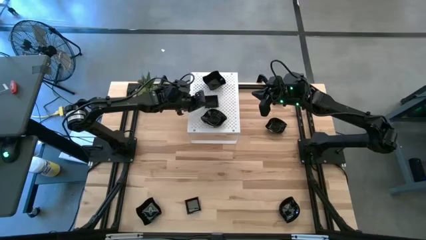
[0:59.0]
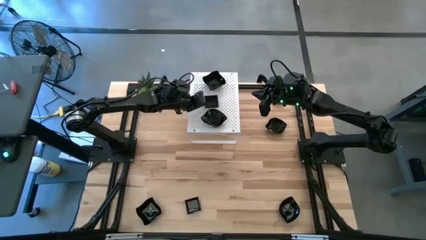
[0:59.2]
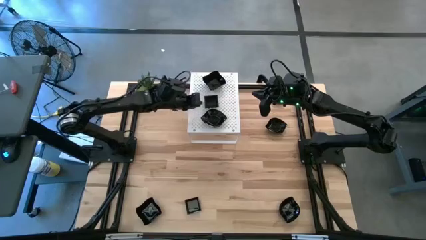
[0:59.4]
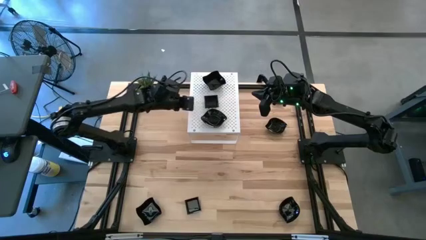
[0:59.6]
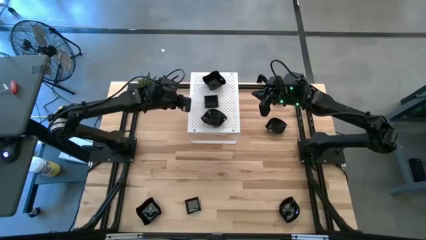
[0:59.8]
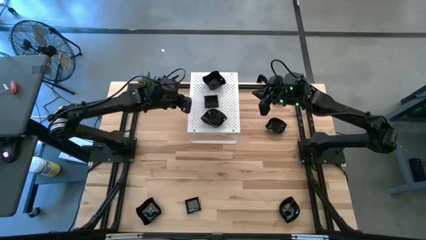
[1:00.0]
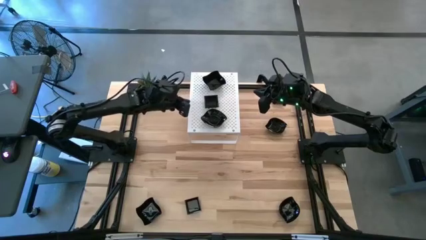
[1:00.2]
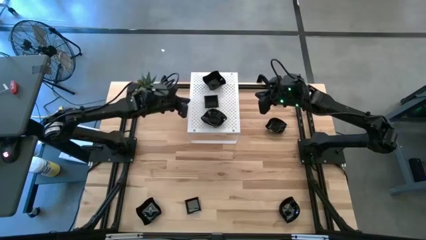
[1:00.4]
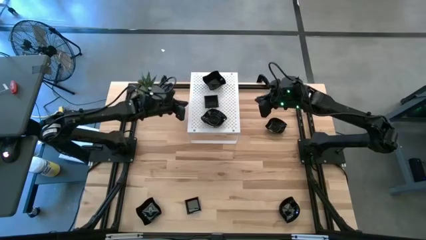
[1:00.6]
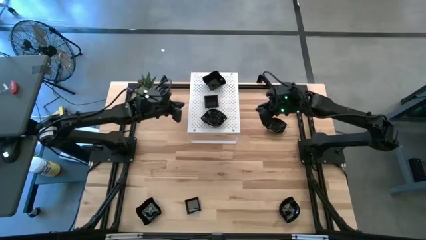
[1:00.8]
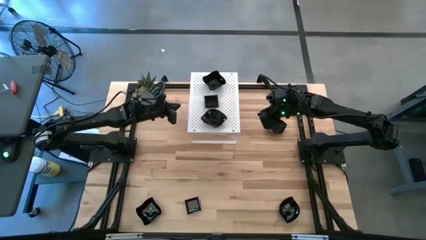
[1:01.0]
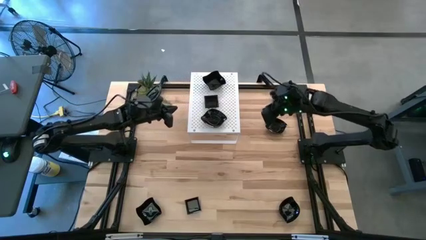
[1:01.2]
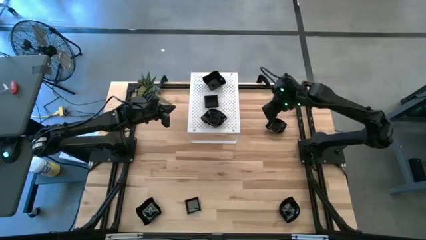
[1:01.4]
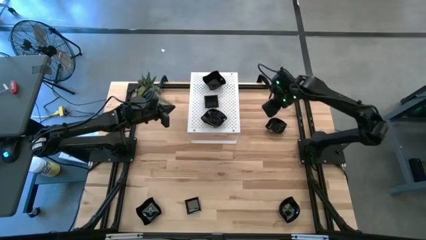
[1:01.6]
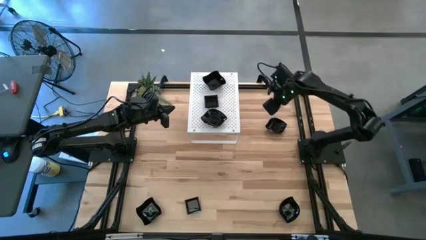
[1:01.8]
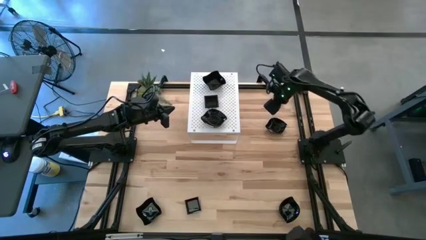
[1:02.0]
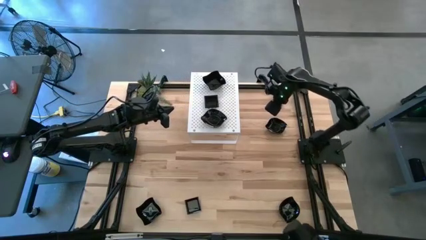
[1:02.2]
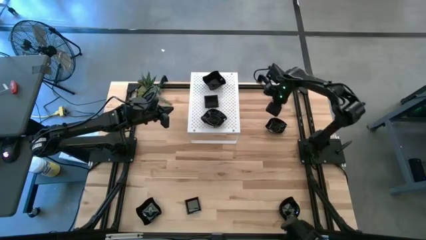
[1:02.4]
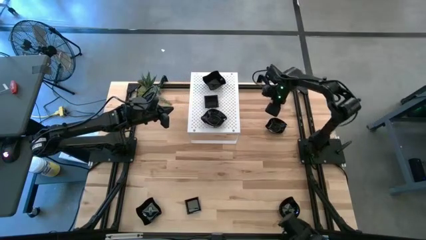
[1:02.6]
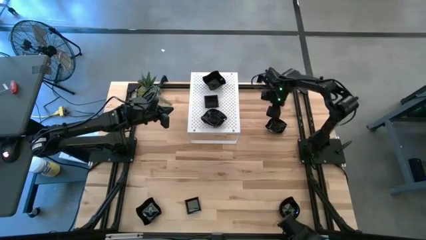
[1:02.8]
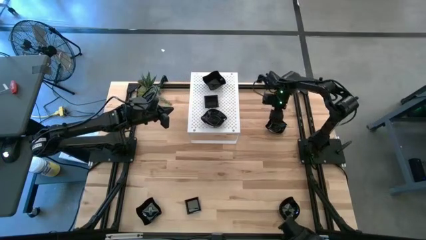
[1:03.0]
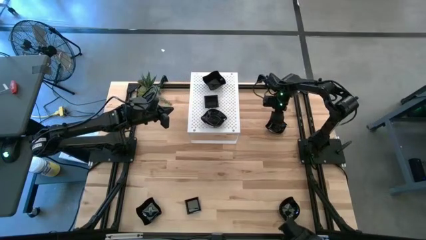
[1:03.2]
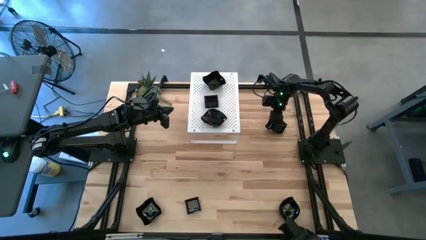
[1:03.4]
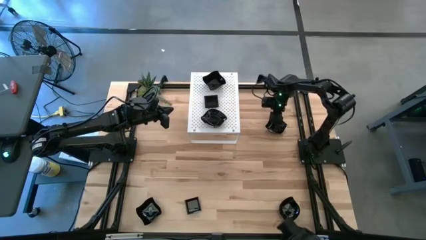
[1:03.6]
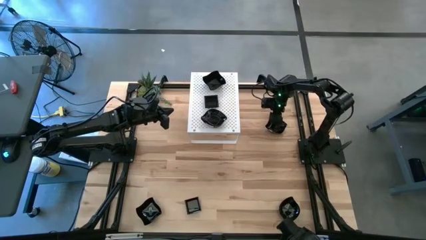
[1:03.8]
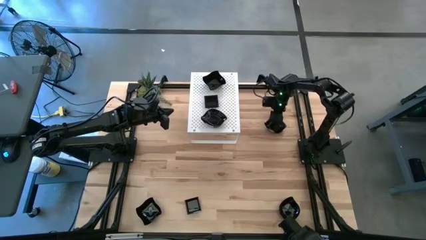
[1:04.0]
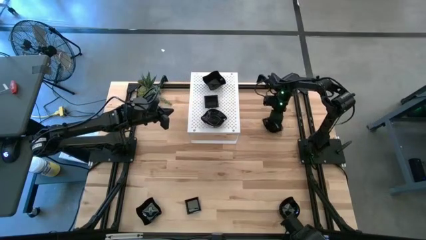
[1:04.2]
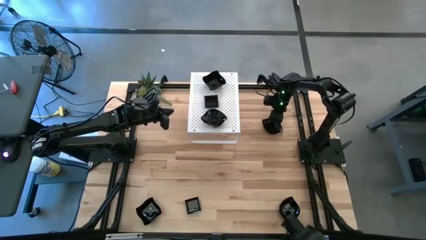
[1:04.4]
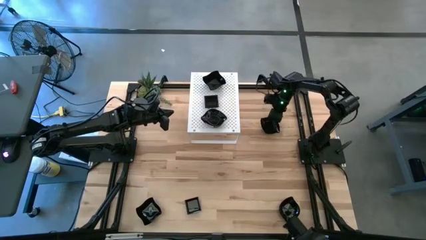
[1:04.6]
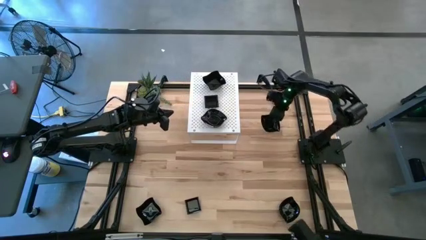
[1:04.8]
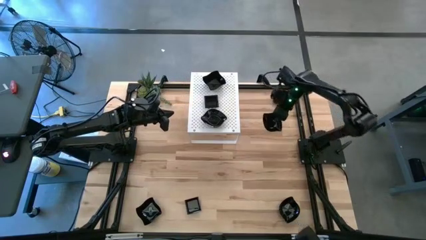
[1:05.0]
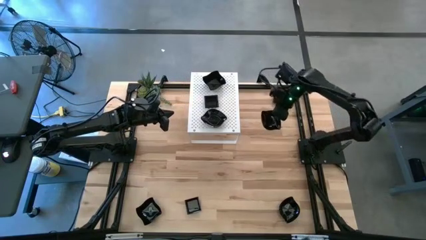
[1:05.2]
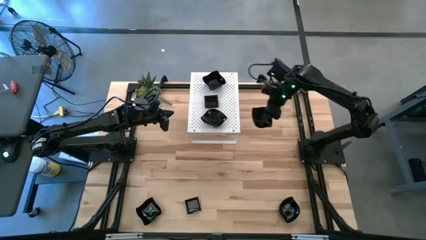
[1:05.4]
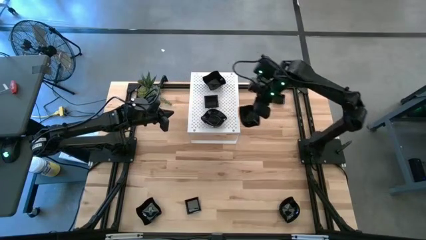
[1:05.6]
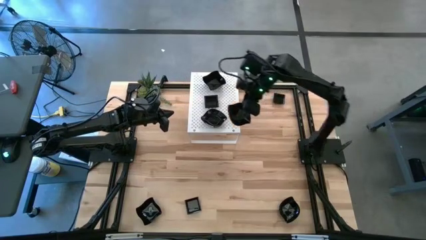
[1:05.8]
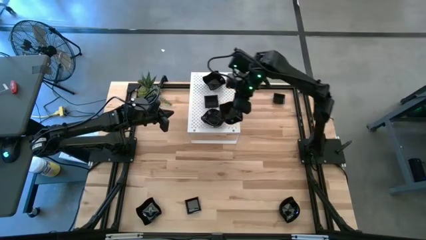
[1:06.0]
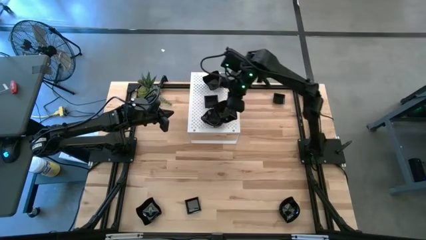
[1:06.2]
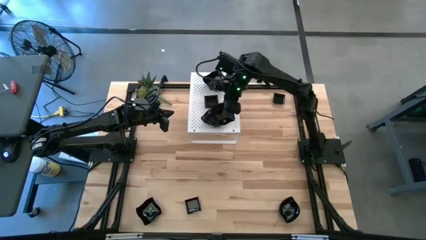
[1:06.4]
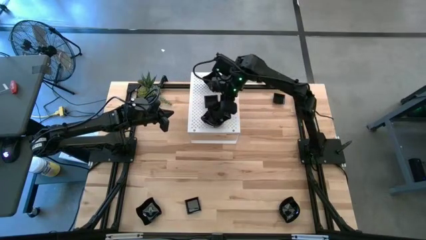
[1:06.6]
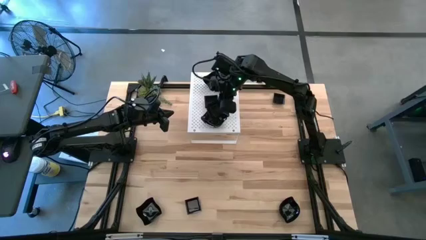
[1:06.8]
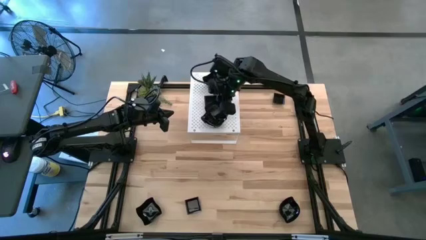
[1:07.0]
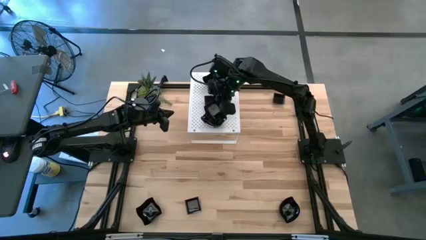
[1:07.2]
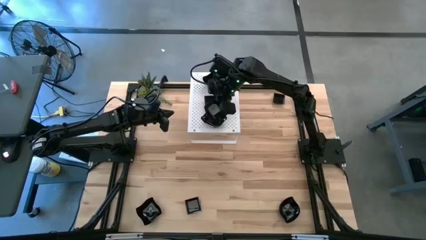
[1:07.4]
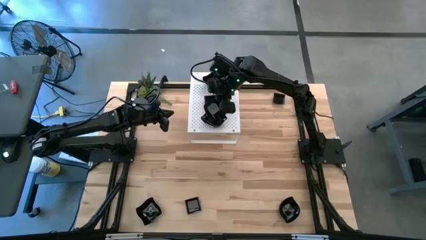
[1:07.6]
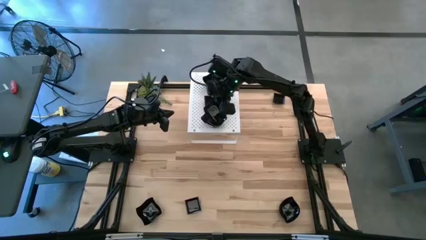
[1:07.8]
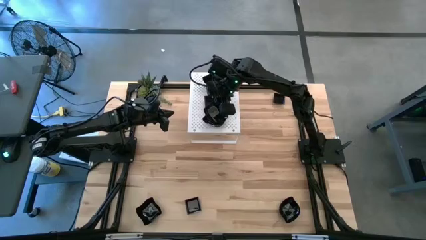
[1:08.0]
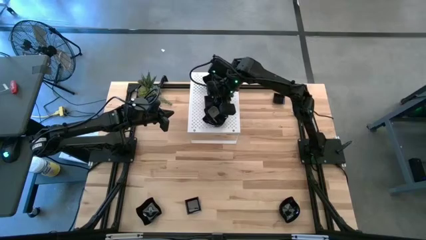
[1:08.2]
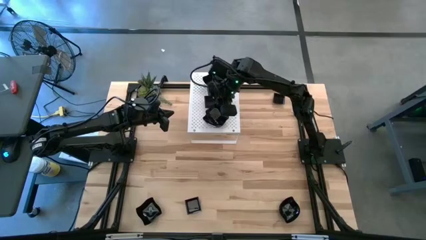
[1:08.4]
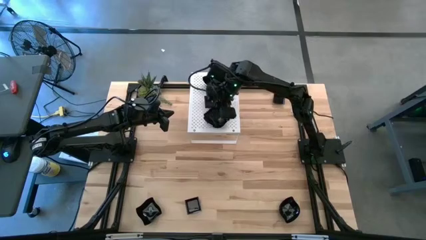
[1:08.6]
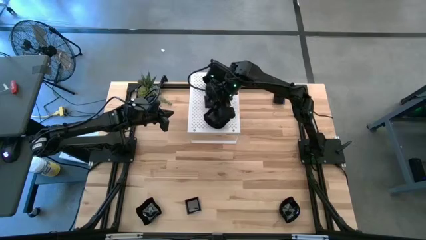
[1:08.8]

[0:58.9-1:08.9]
Task: Pick & Place Mini shaped plates
Stack the black leaf-shaped plate on top of the black leaf-shaped plate on the shelf

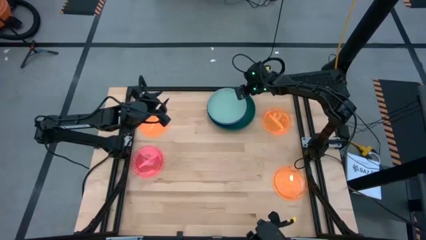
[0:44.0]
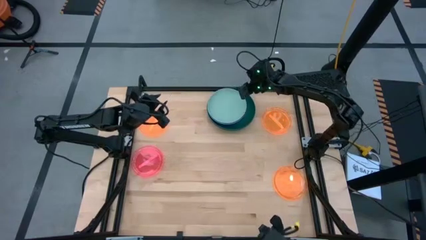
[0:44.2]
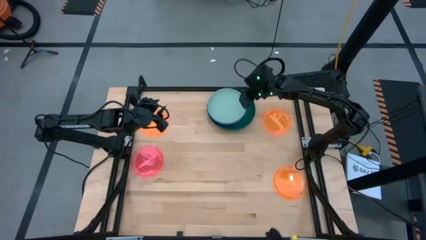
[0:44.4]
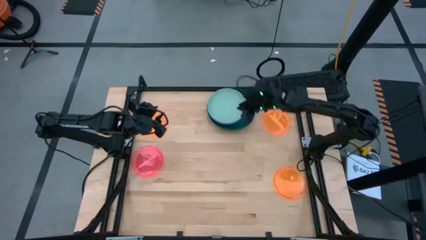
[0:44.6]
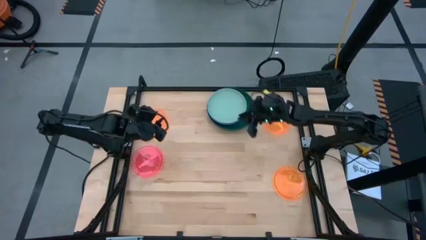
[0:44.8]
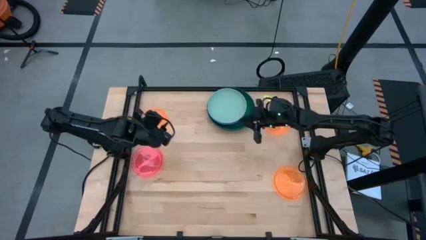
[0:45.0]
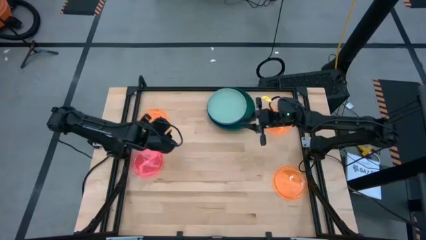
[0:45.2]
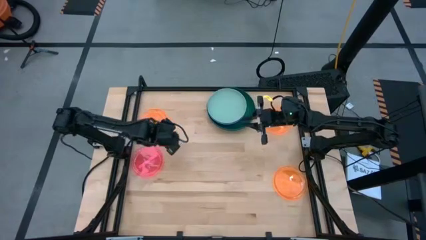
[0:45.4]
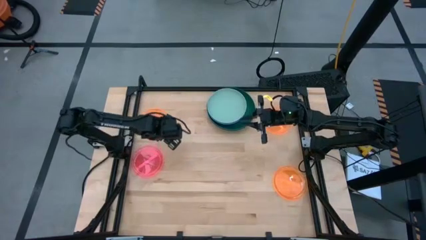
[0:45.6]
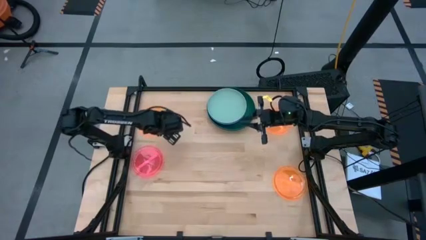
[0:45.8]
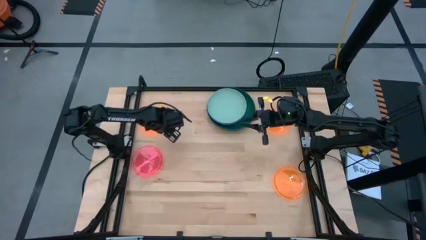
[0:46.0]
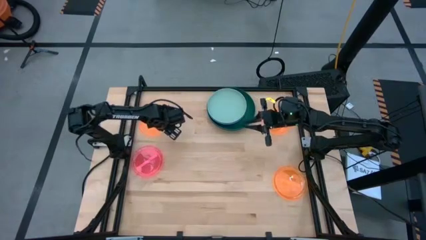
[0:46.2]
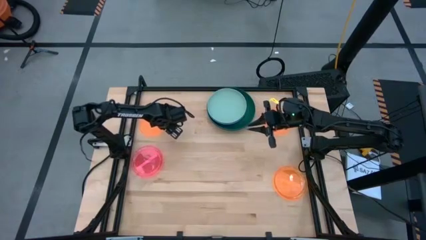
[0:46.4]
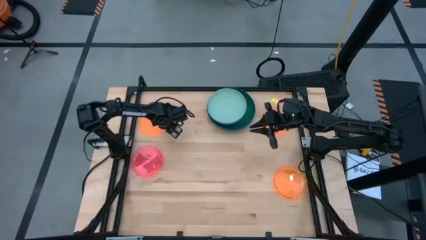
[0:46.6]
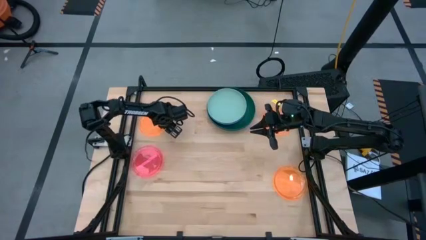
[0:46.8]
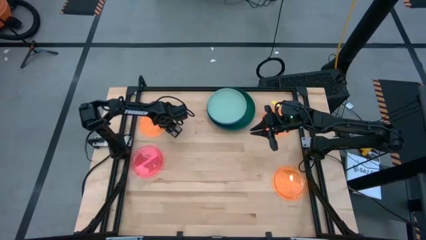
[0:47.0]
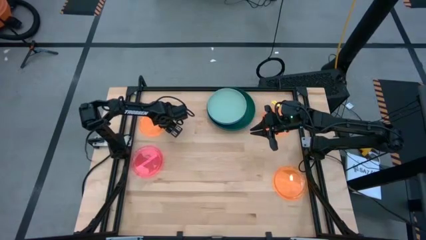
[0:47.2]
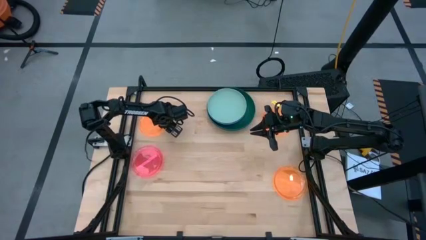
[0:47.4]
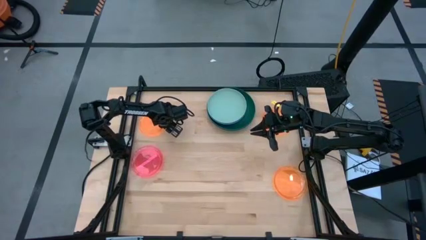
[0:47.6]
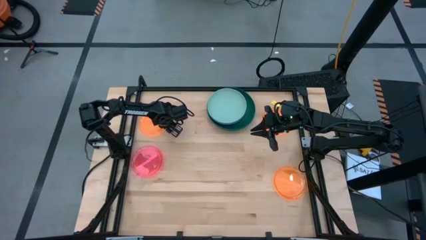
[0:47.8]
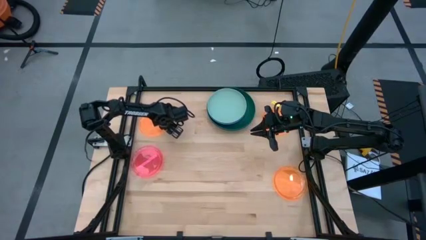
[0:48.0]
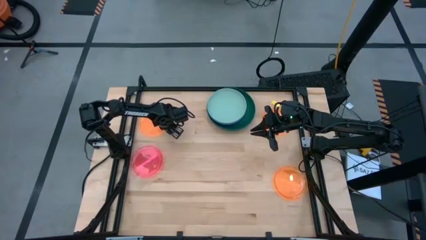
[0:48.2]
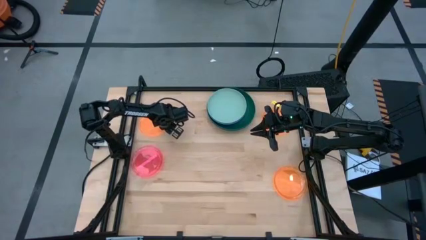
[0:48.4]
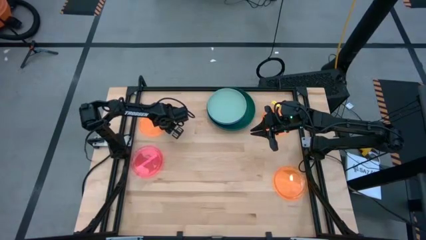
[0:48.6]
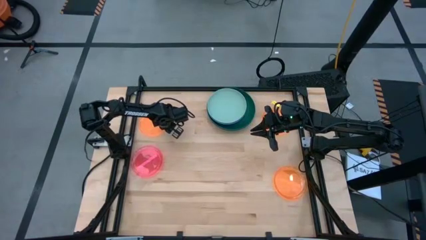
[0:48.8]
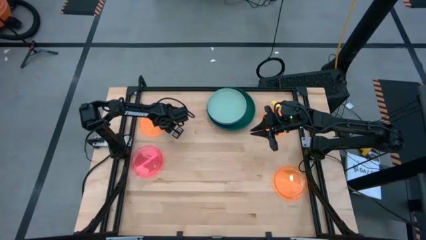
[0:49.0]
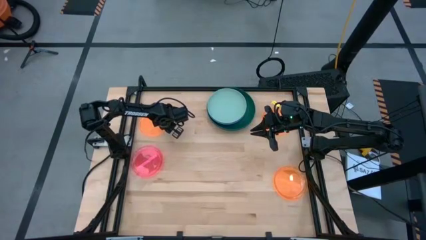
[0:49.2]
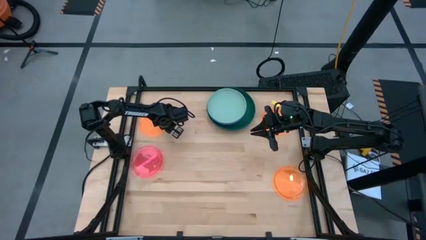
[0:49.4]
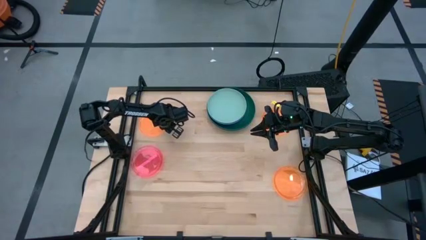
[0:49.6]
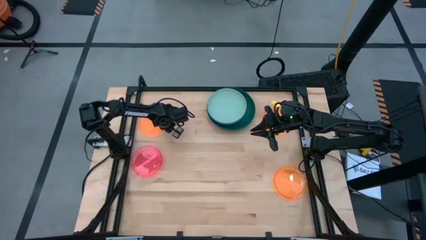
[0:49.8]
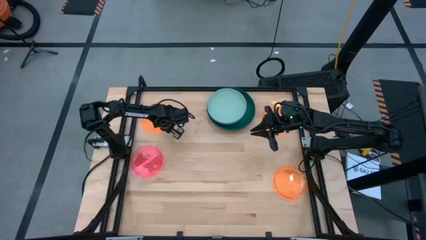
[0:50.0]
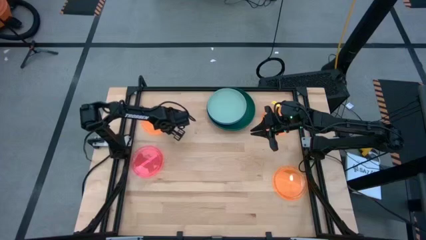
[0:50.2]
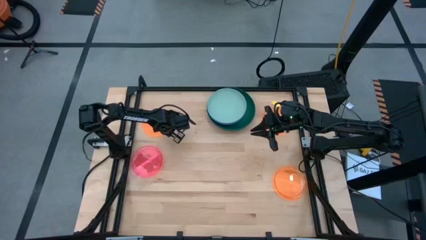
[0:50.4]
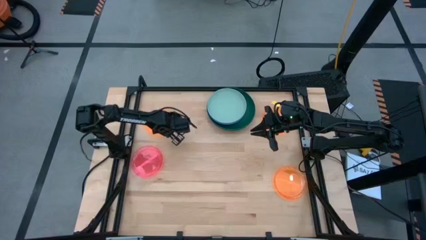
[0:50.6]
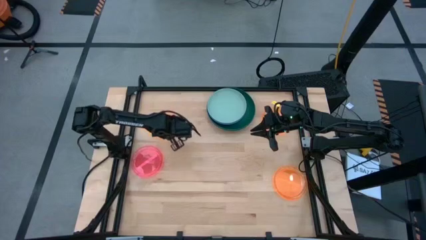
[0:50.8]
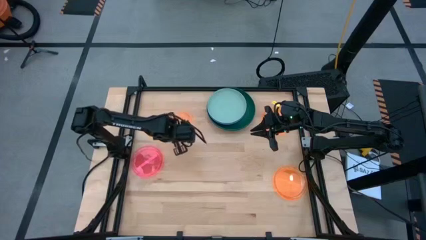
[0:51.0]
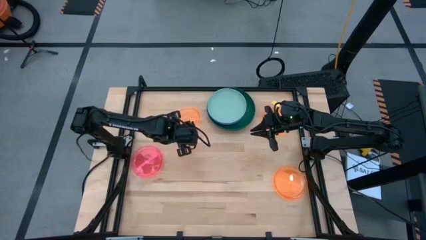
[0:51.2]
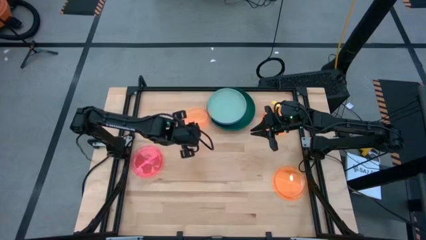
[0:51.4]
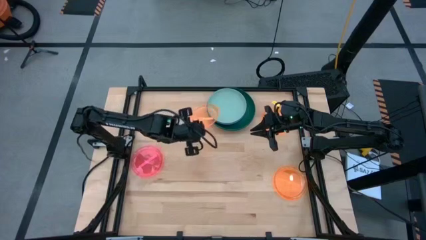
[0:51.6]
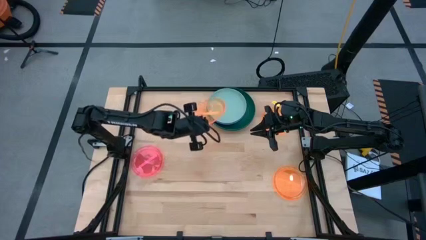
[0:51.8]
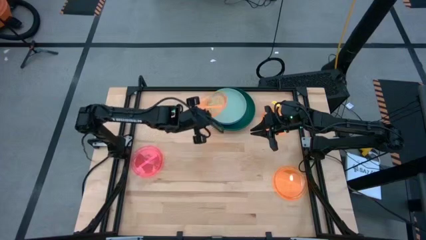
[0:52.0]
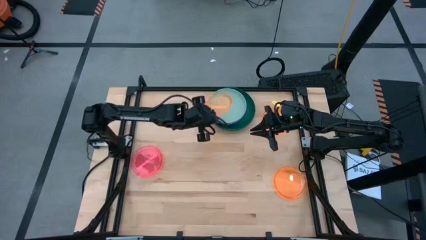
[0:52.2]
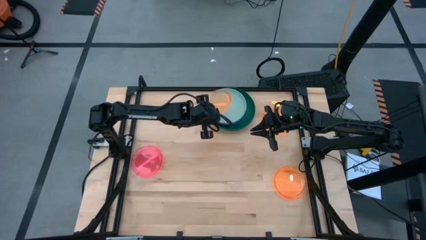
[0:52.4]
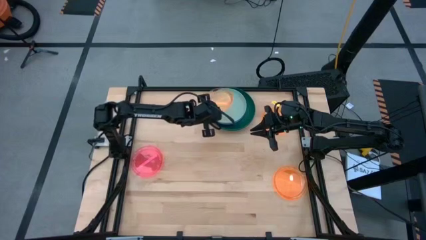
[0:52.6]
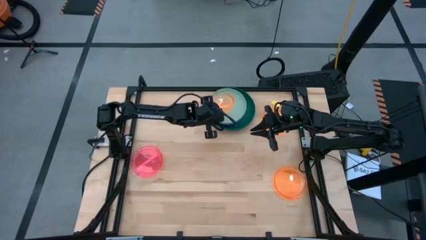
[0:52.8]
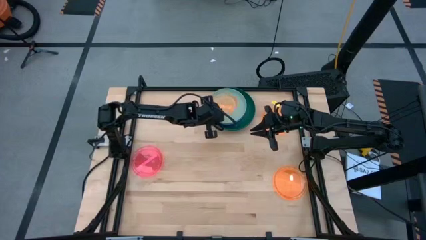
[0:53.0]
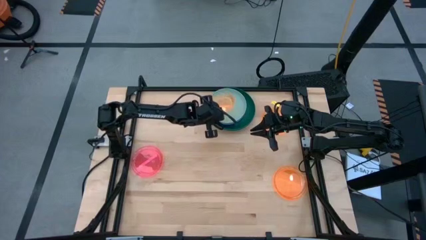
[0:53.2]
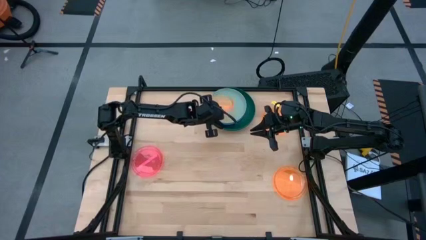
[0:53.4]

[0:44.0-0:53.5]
Task: Stack plastic plates
Stack the top left orange plate on the light blue plate
